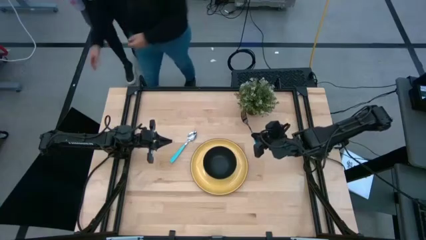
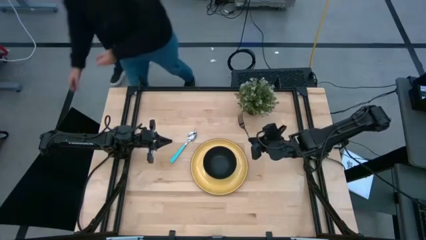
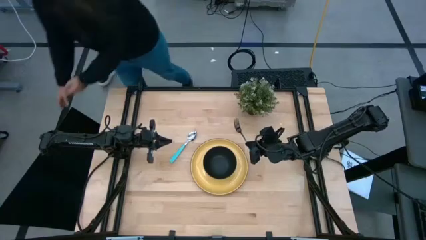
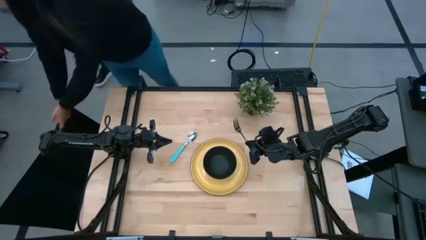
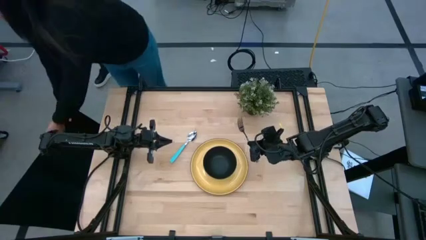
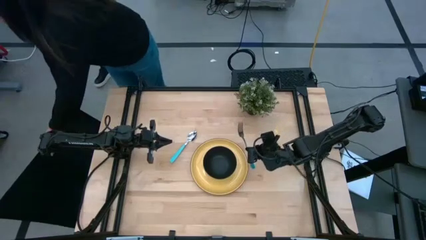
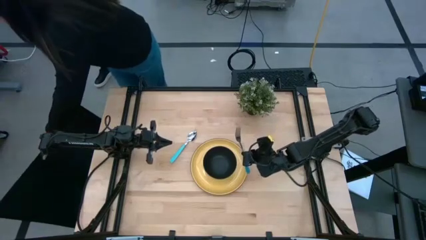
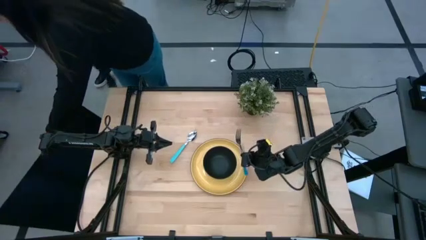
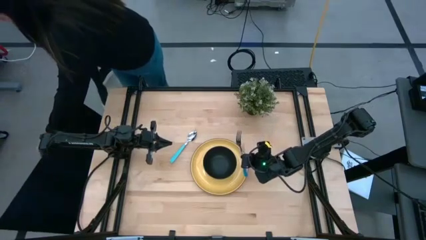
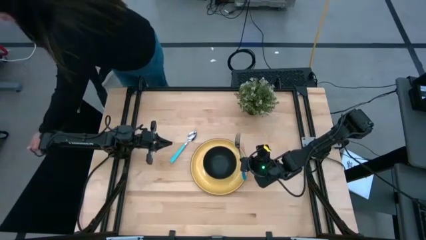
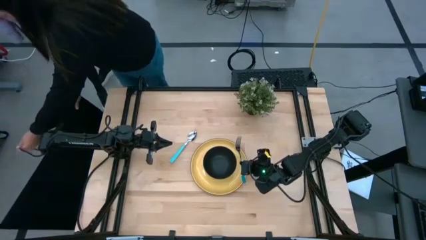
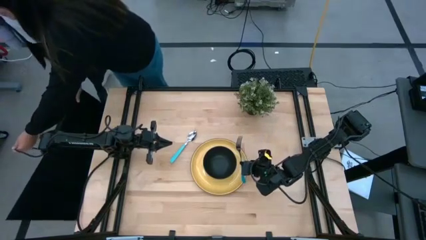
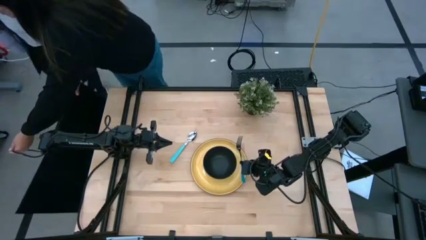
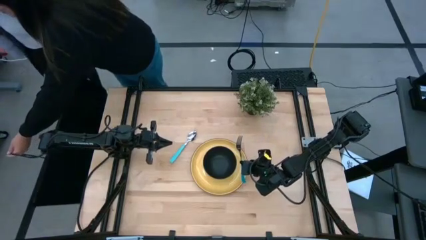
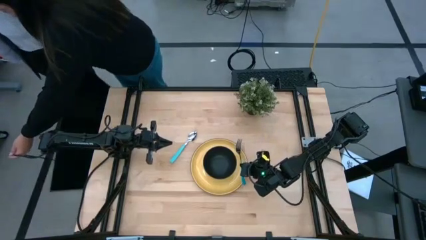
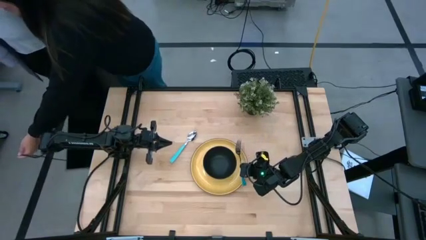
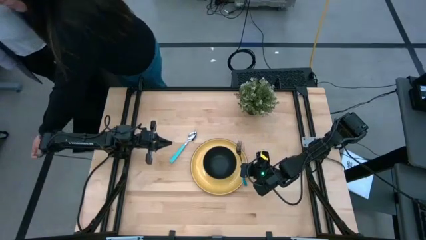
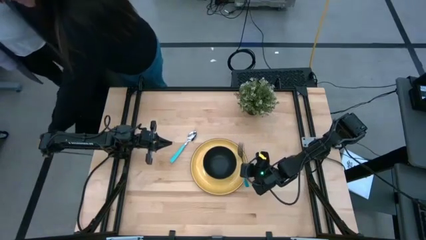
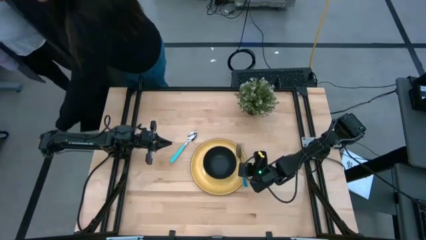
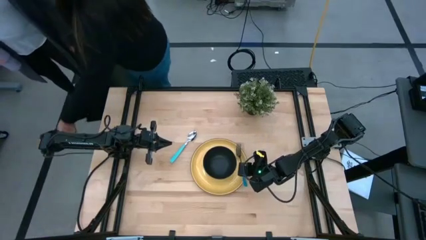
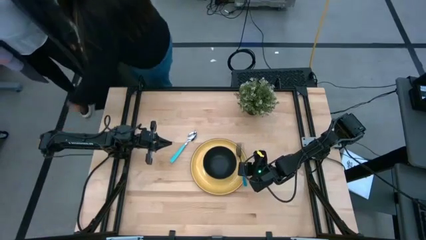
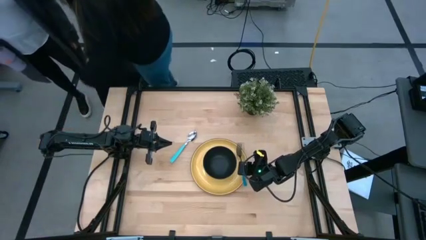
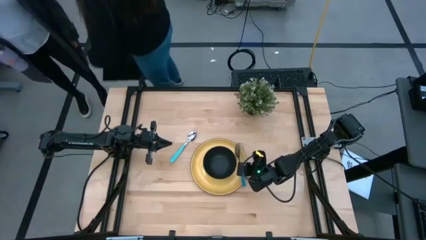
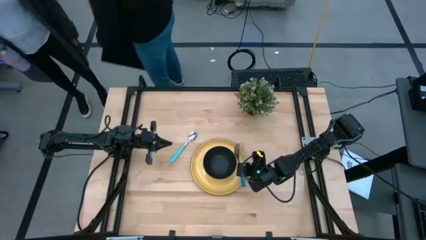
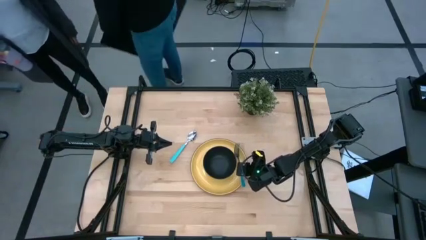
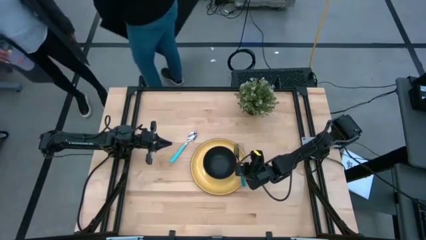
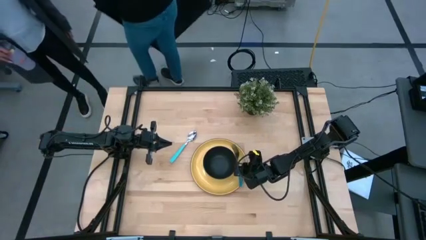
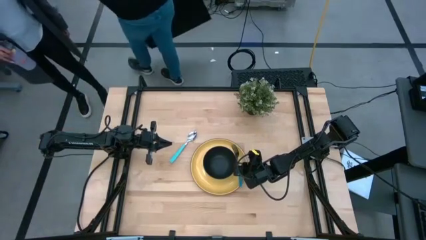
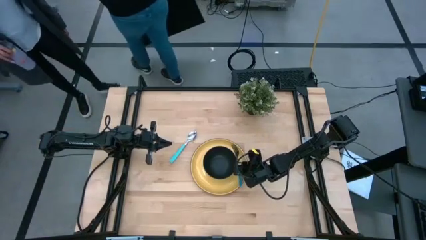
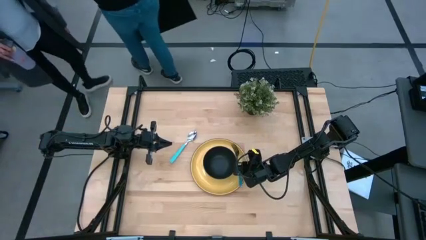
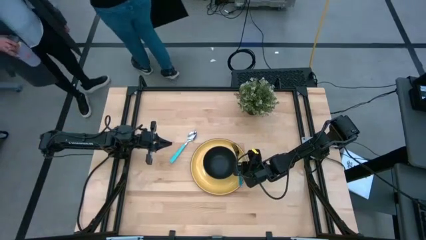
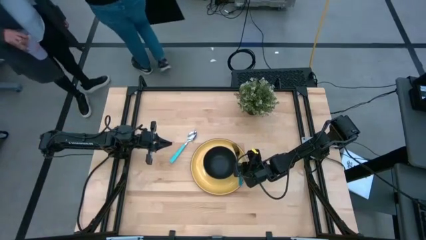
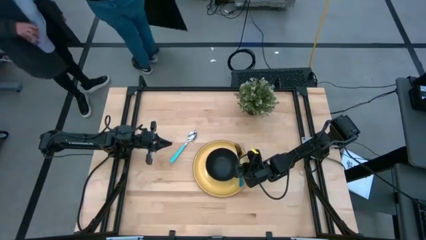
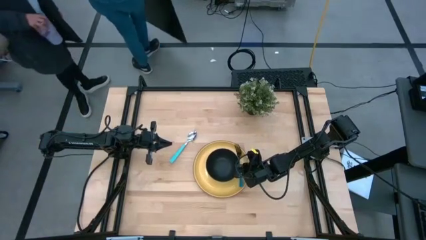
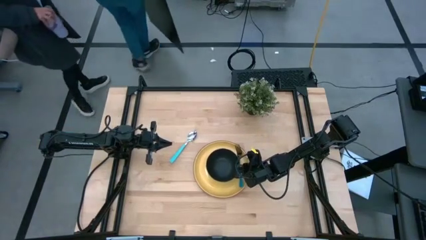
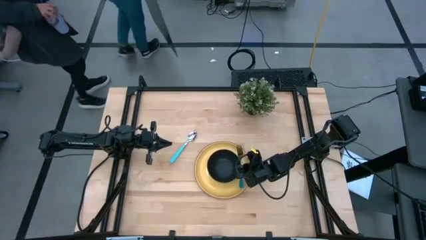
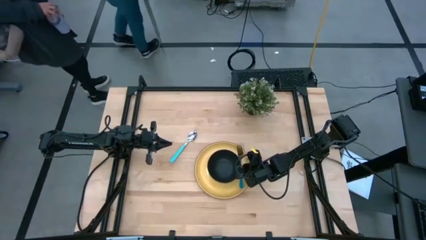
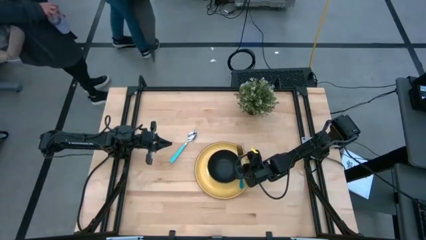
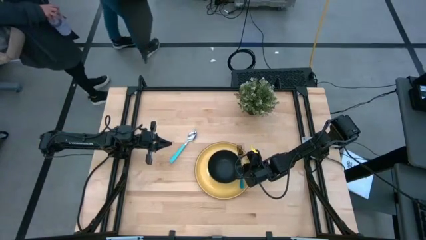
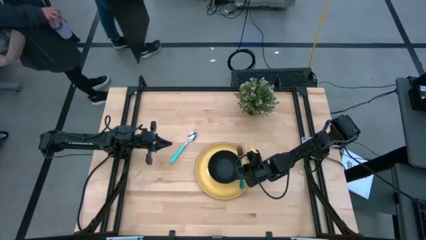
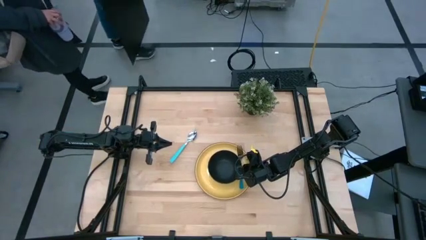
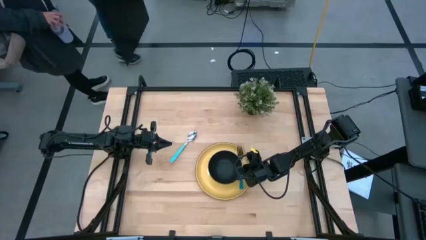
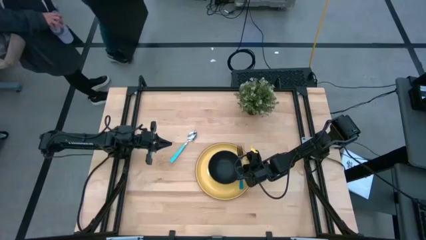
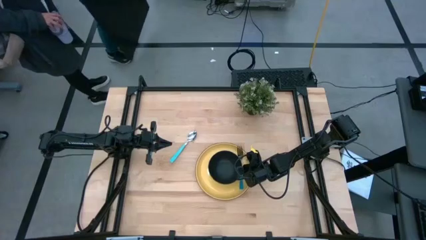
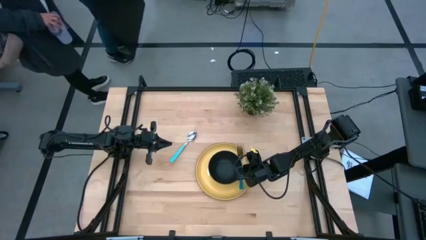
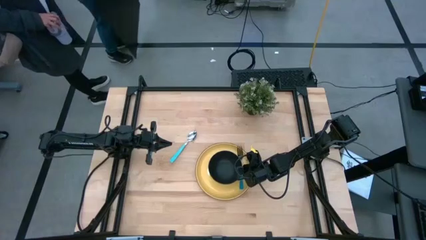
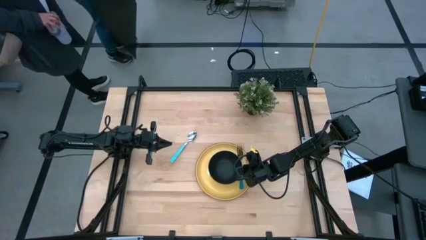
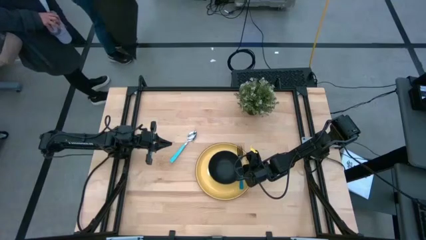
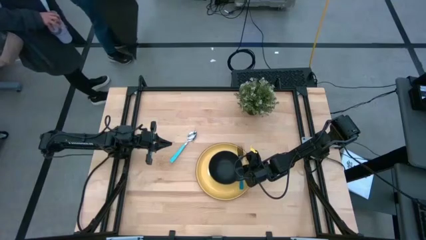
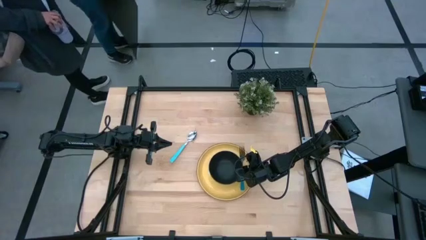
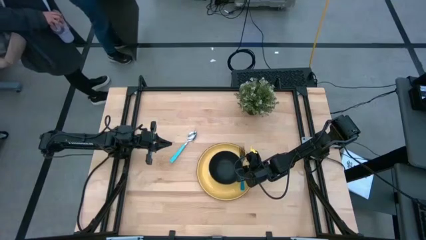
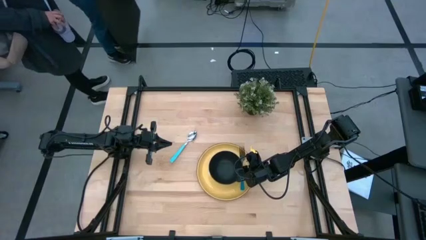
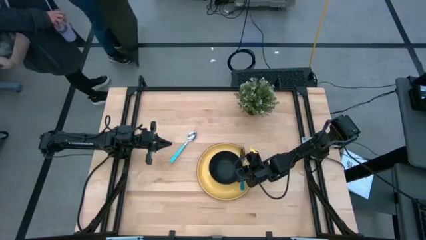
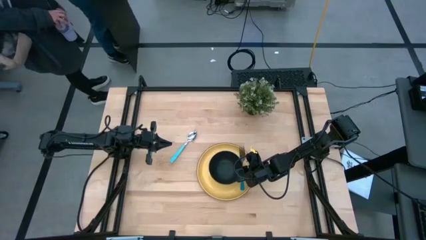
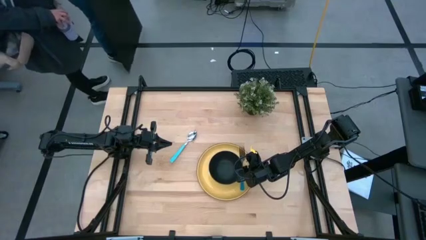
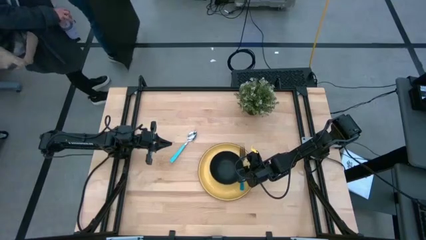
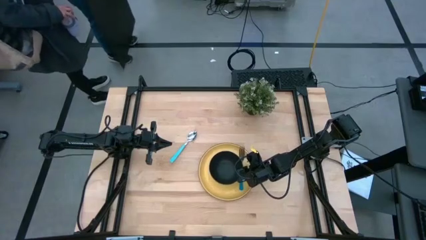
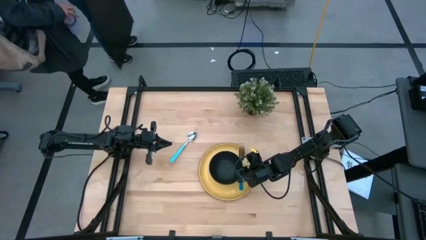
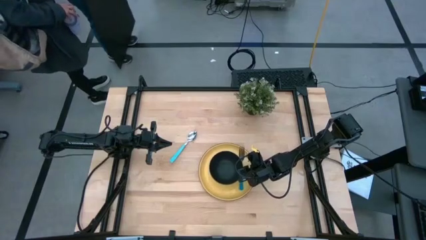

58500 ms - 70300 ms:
Task: Set table place
Put the blue fork to the right of the black bowl on the yellow plate
